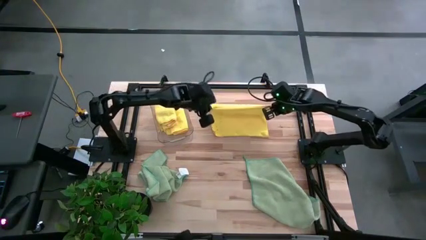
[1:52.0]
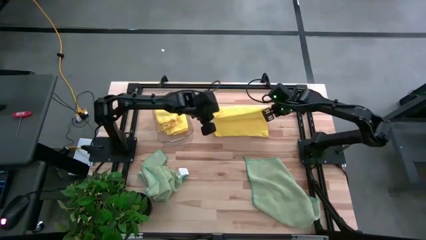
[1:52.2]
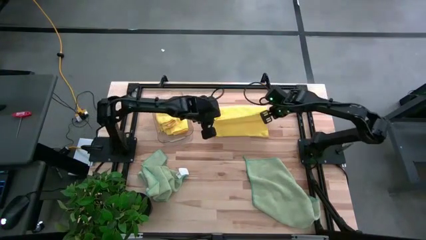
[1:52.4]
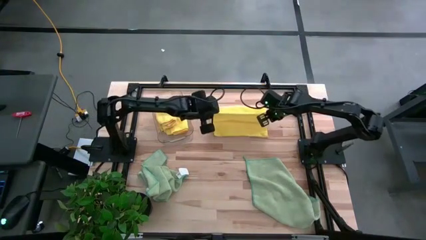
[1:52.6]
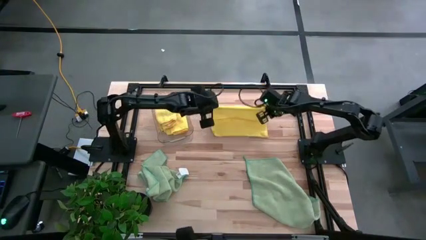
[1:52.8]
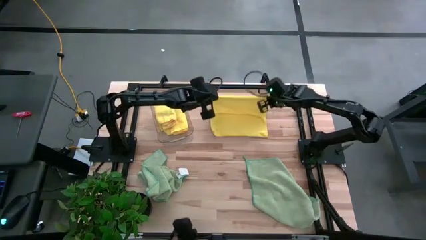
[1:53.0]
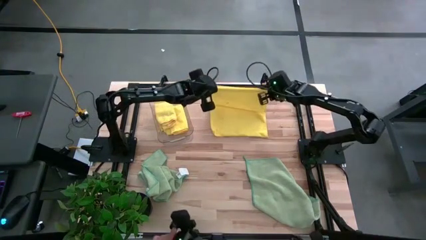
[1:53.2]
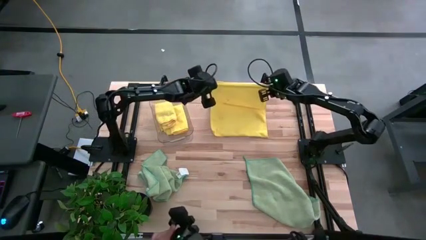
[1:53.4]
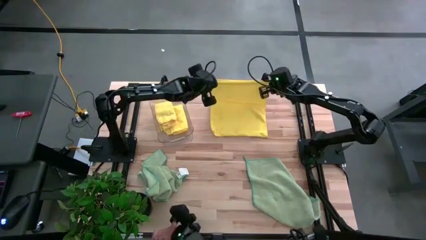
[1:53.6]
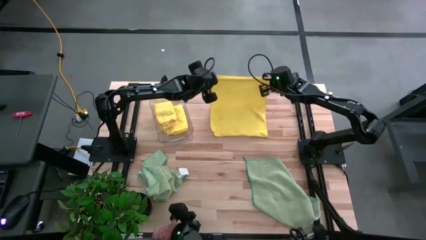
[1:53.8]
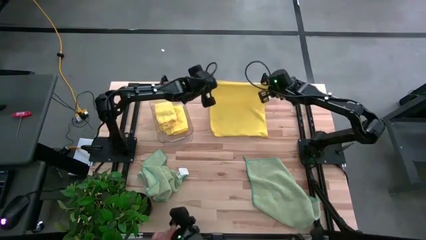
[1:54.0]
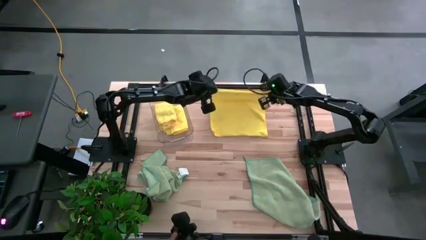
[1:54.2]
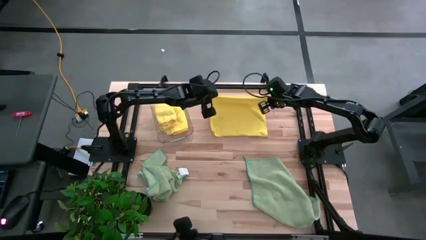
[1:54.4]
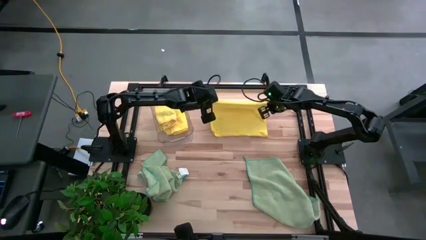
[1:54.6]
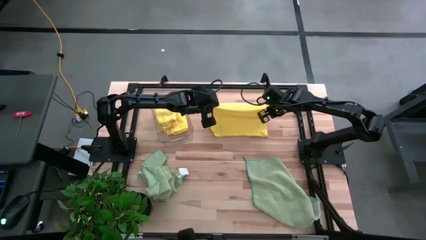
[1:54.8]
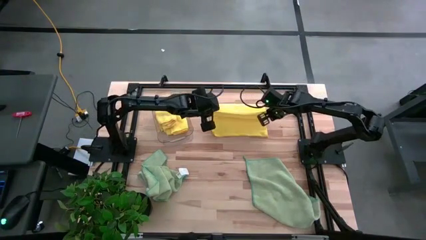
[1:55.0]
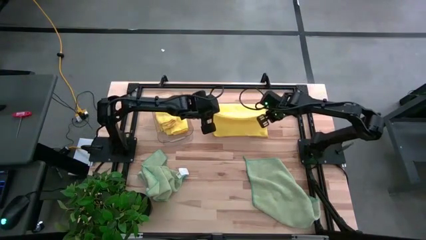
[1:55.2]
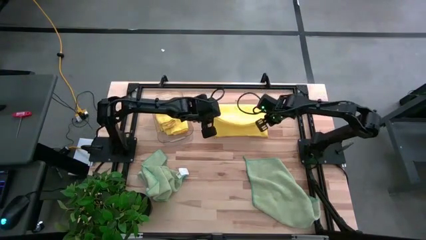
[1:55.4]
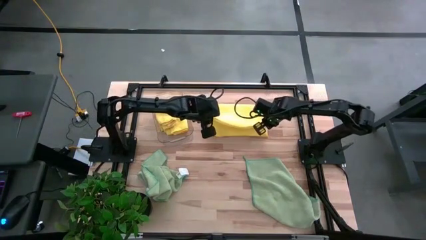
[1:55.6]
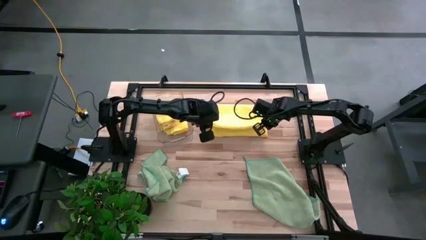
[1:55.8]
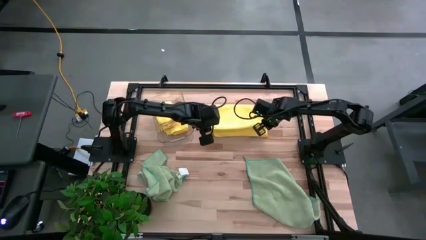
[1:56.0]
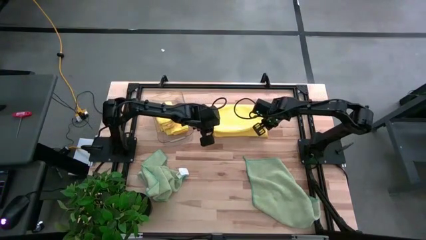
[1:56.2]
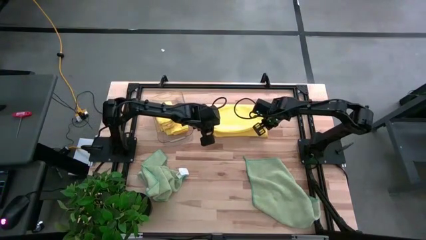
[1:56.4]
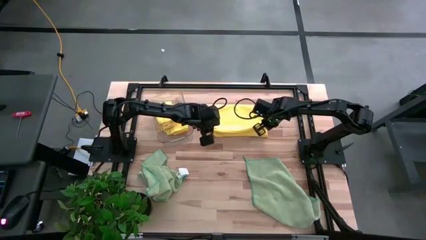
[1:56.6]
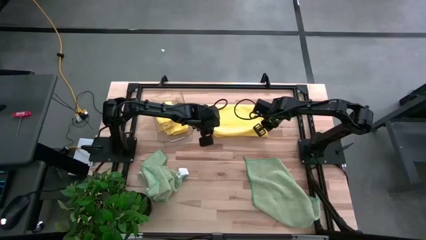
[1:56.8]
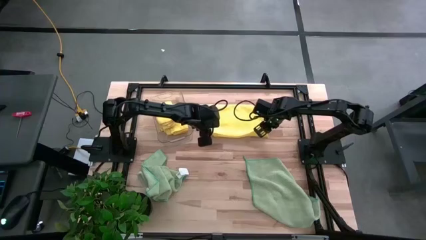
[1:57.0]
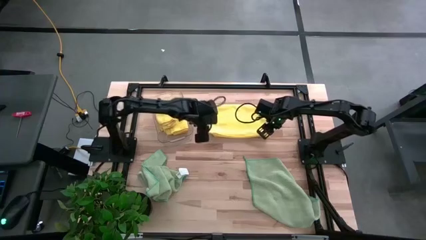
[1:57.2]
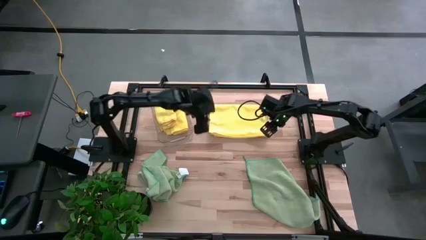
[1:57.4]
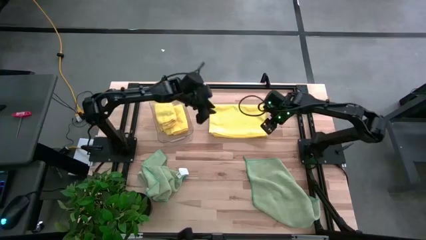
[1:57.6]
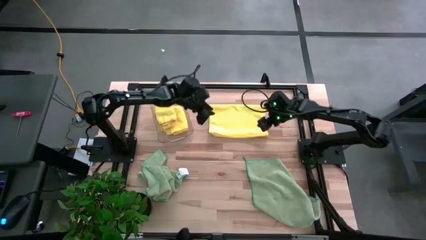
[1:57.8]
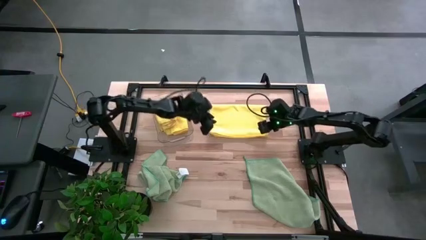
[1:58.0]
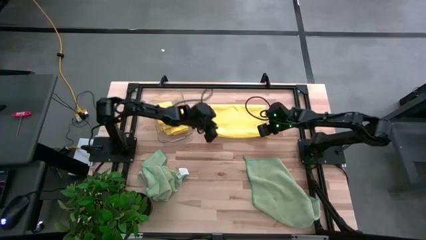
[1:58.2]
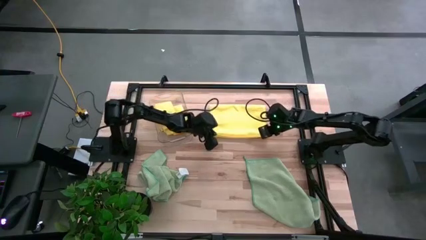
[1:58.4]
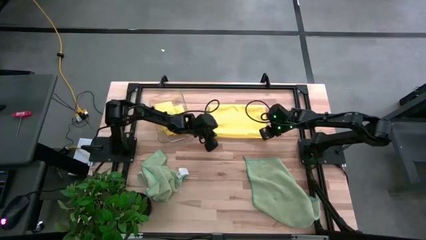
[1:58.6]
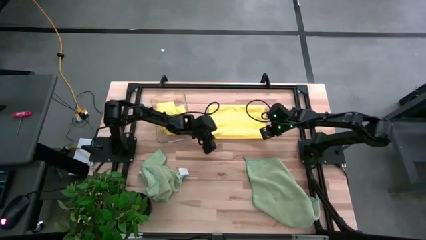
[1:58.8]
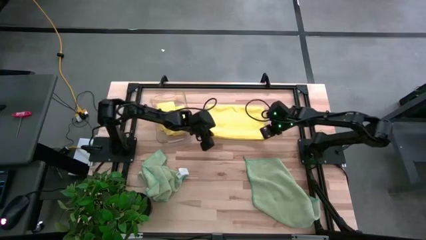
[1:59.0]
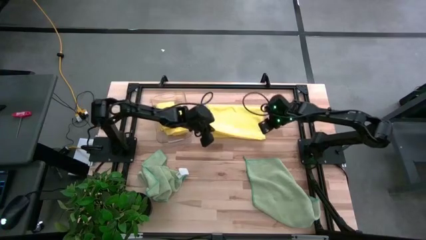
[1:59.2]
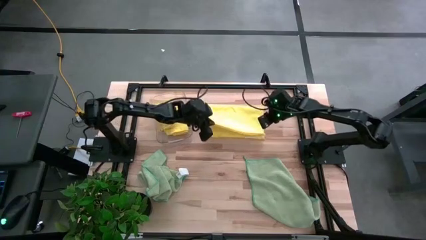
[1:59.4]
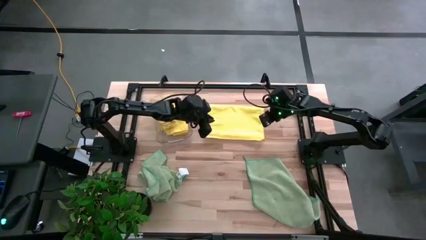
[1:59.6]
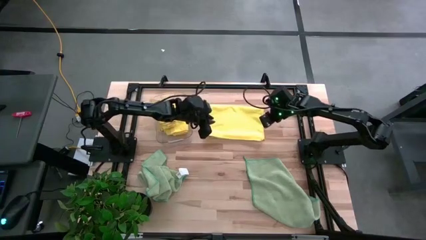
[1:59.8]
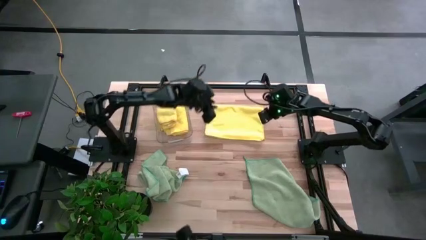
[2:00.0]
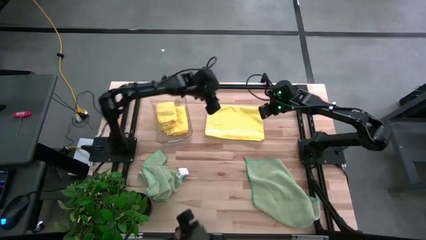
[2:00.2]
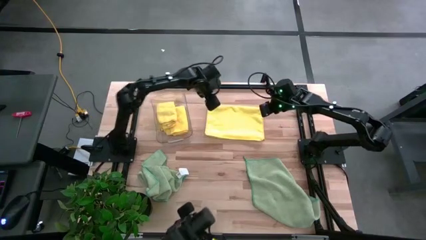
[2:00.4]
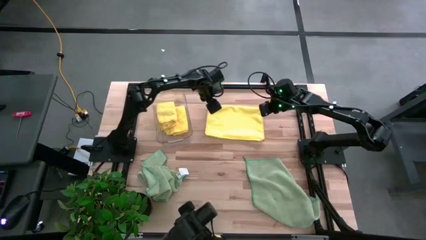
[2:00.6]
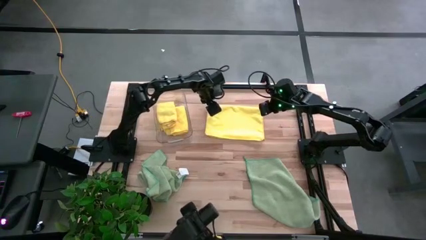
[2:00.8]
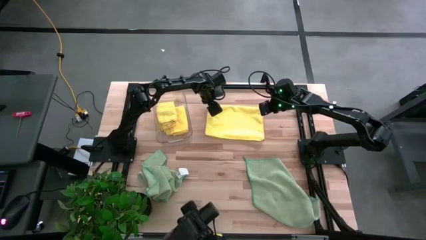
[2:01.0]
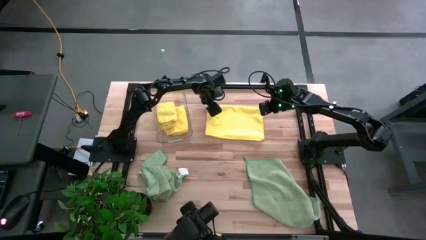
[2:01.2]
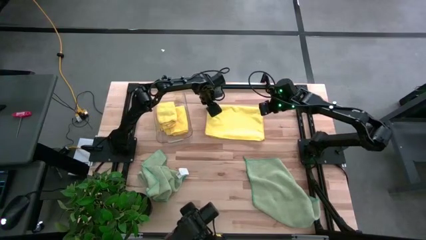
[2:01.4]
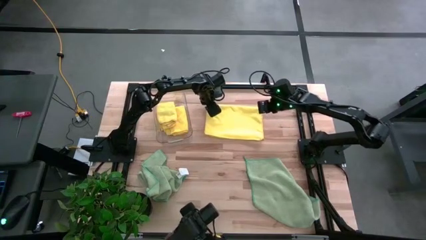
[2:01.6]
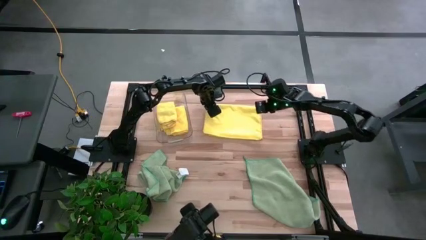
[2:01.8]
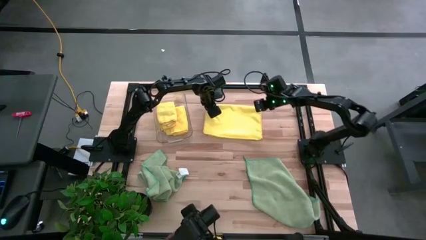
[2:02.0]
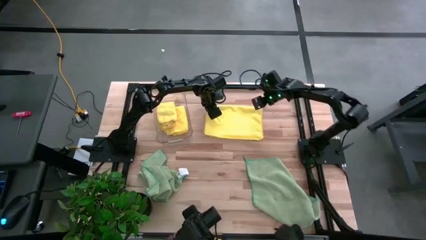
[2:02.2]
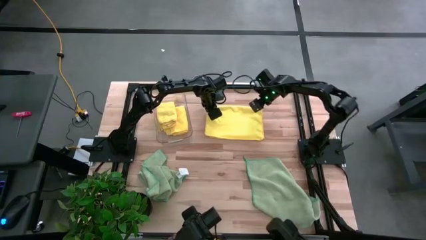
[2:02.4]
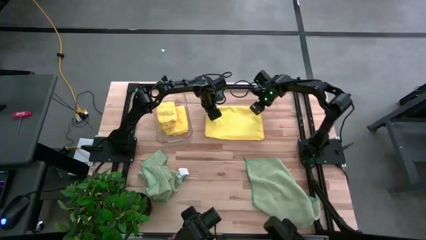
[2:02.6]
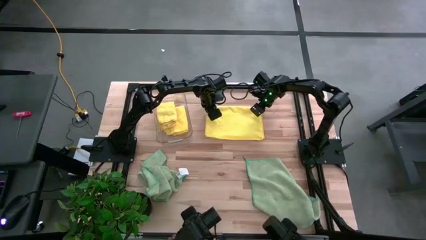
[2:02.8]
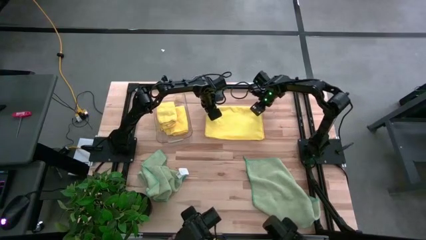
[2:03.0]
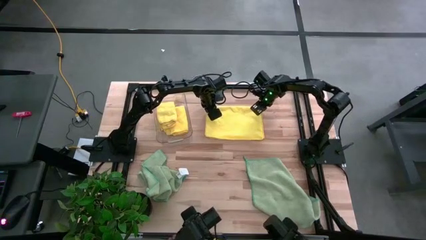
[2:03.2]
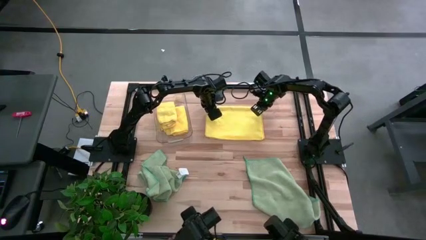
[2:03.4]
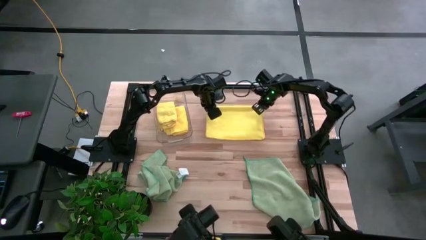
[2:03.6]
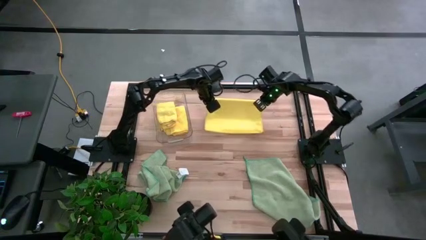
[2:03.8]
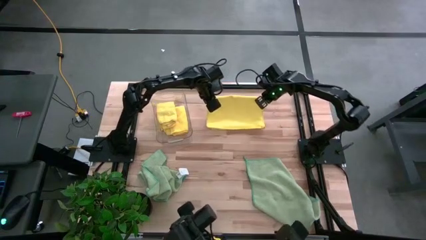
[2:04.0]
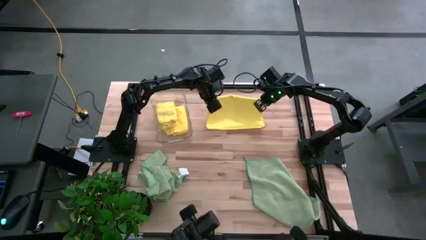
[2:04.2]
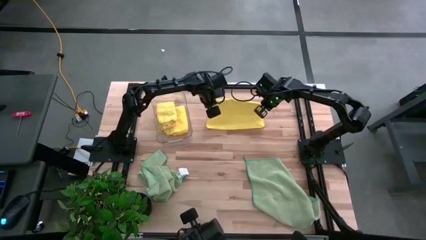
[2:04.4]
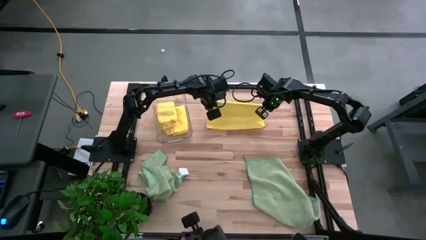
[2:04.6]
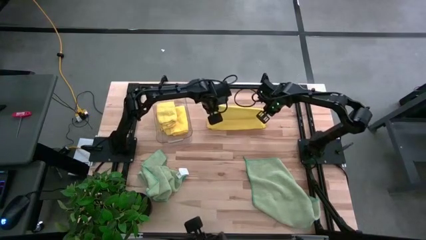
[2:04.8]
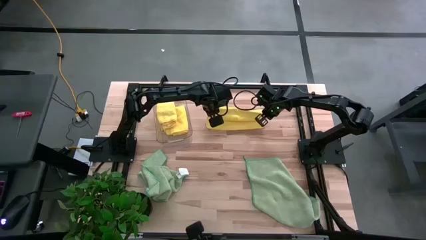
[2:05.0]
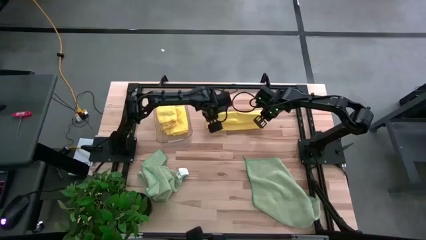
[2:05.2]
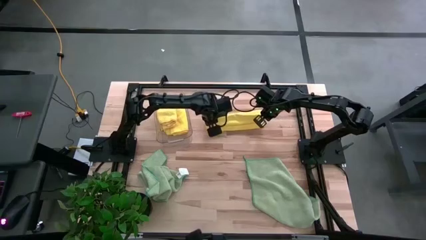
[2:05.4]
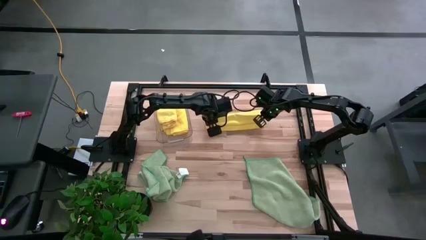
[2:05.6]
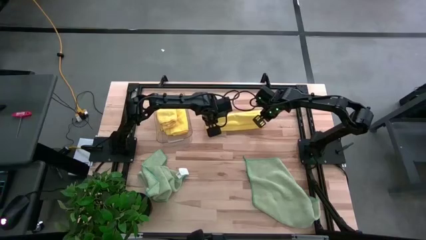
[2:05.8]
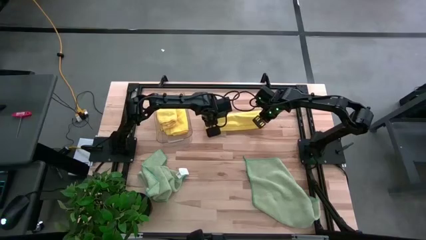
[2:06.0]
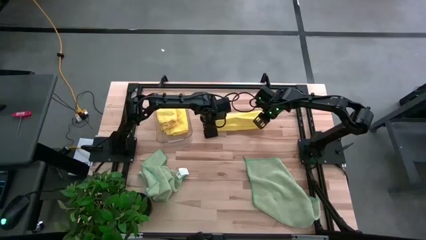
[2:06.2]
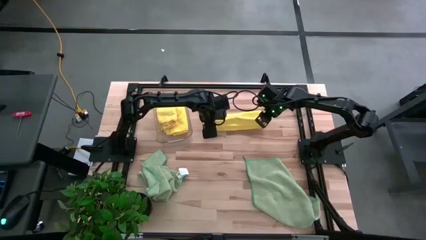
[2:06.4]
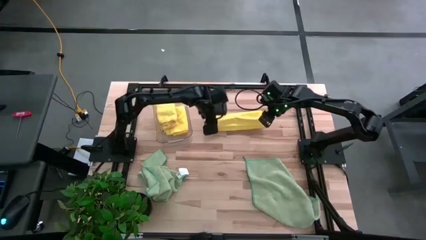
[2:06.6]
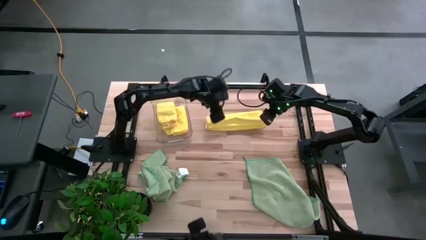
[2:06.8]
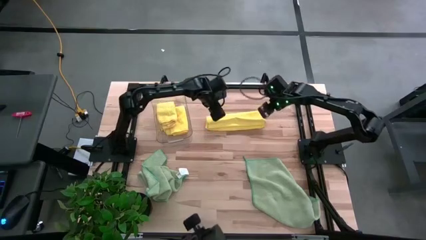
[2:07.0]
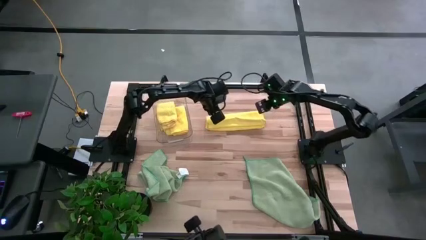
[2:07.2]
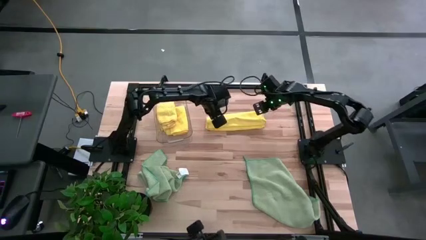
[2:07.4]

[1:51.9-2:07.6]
Task: Fold microfiber towels
Fold the yellow towel
